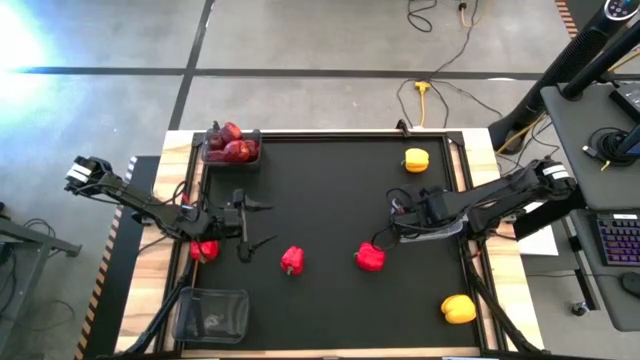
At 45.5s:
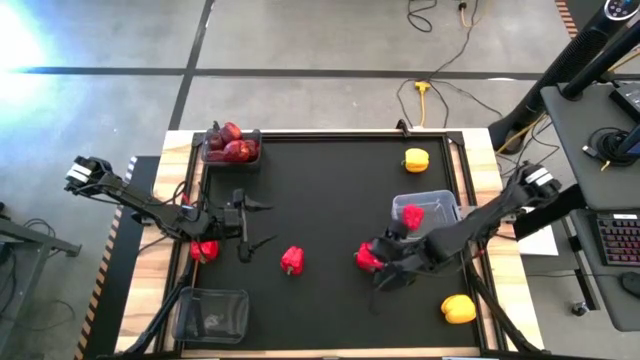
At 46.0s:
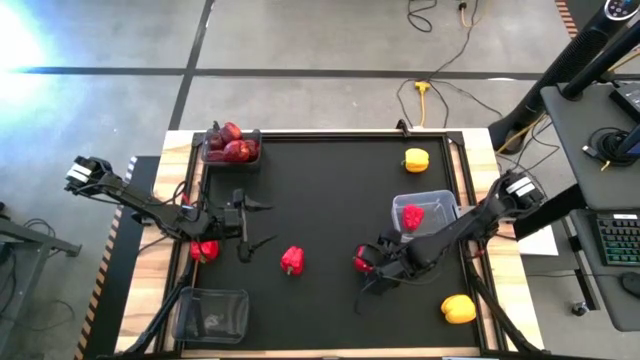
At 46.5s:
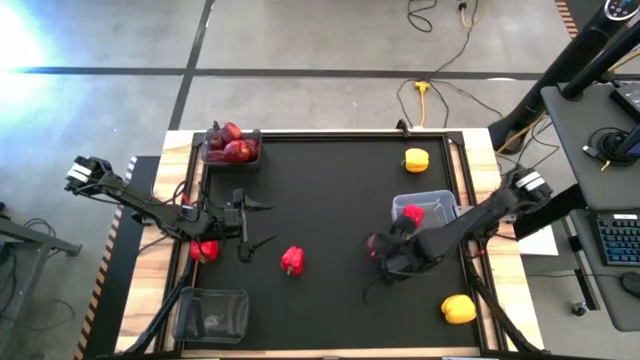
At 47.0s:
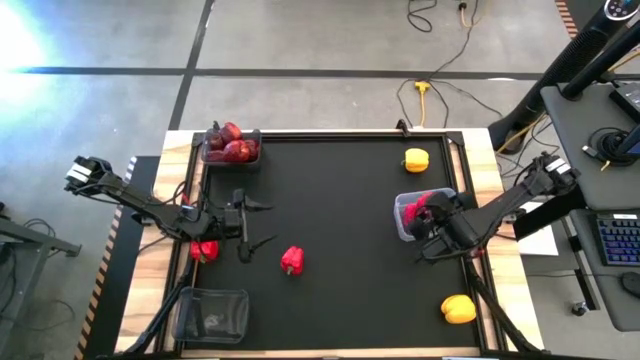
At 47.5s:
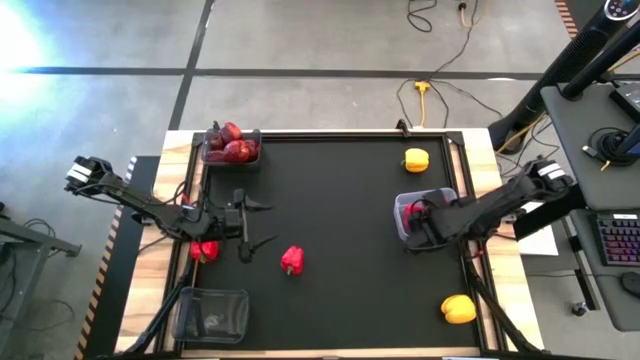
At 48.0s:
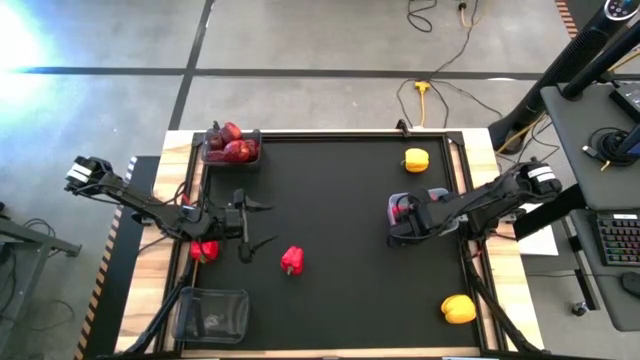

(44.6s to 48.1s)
Task: Sort produce into baskets
Put the red bell pepper into the transparent bin

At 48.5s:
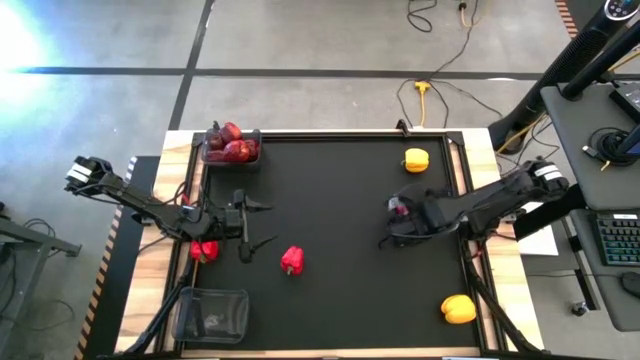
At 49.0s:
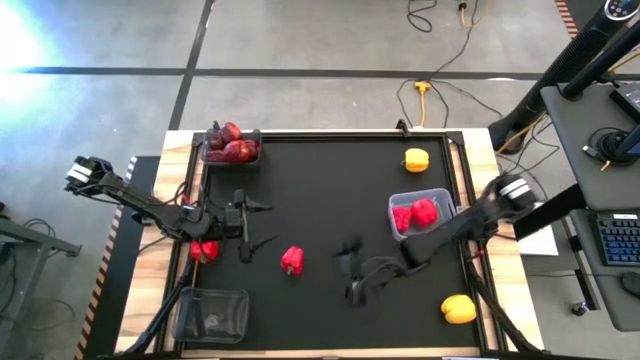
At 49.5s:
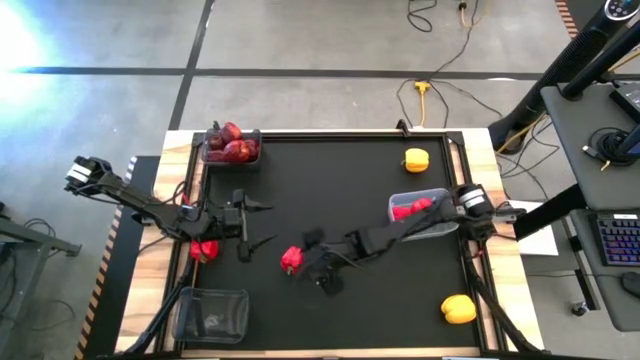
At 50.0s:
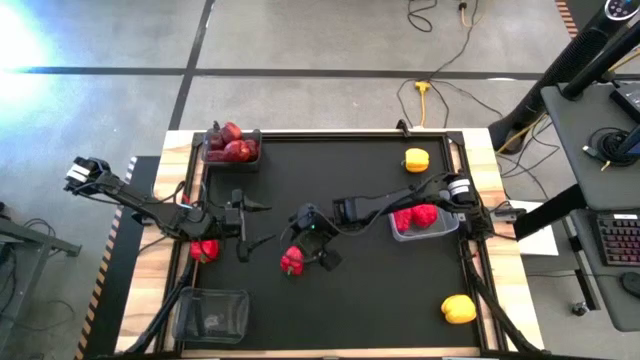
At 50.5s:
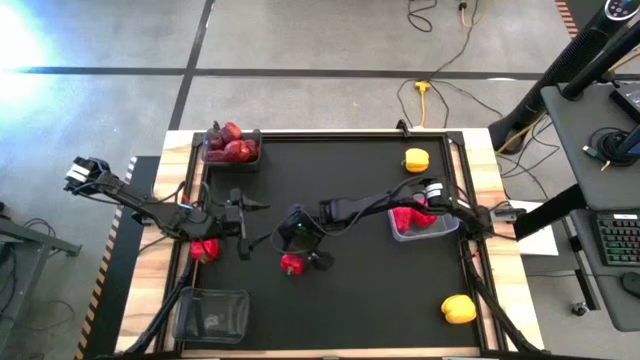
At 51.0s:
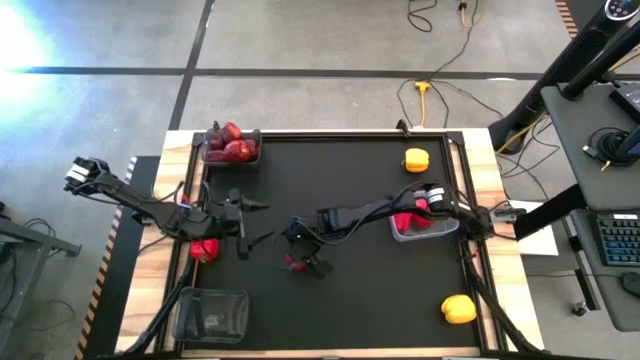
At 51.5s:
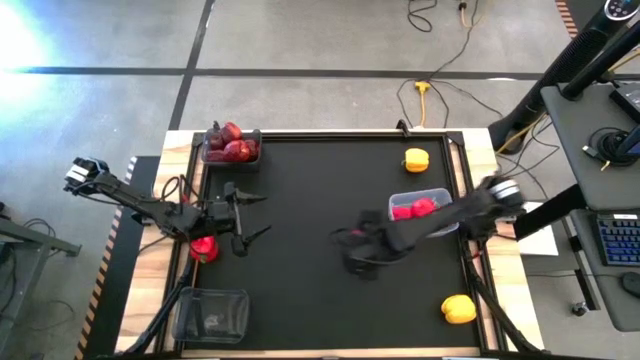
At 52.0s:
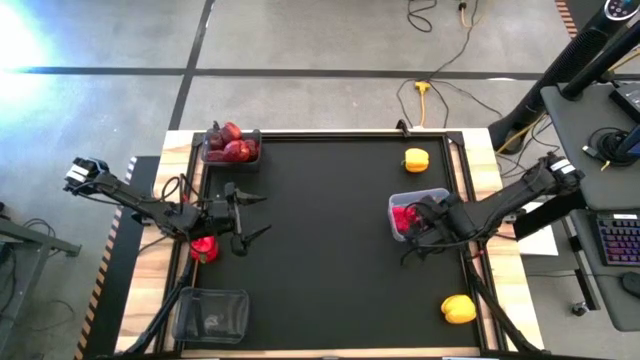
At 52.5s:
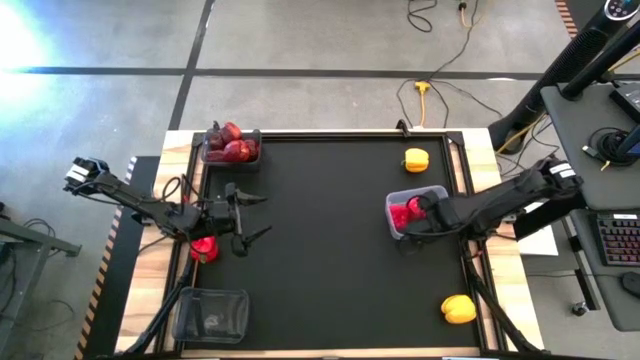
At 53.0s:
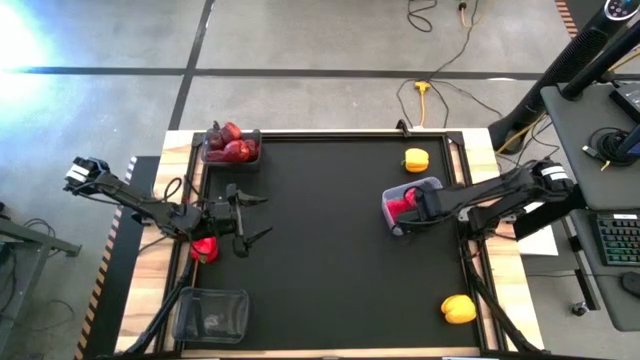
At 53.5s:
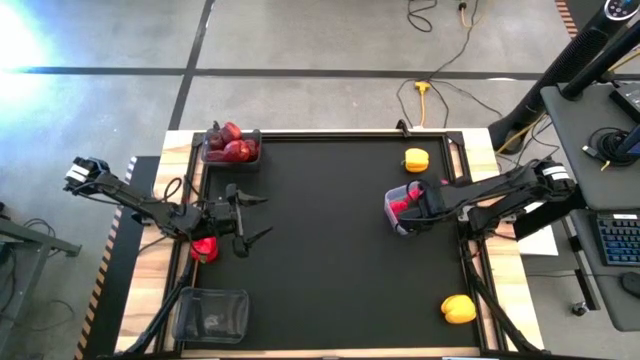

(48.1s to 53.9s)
Put the red bell pepper into the transparent bin

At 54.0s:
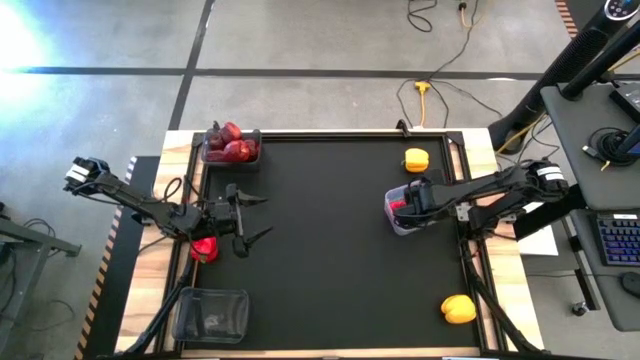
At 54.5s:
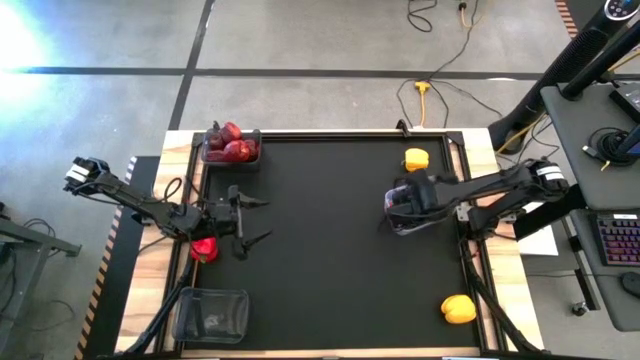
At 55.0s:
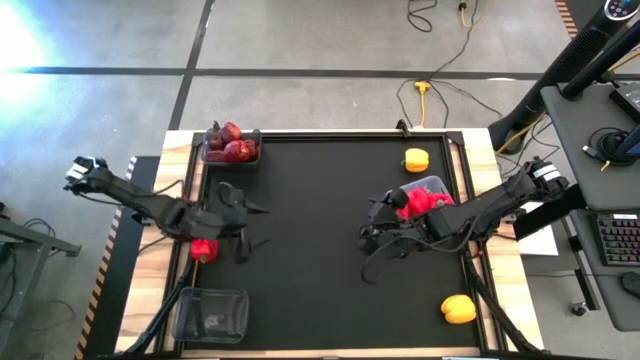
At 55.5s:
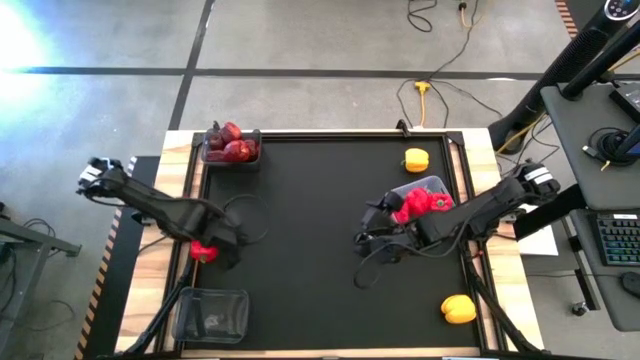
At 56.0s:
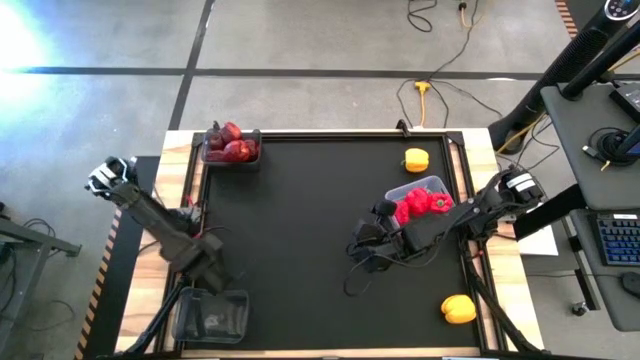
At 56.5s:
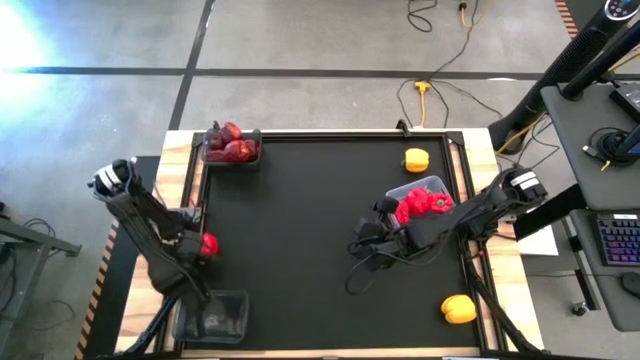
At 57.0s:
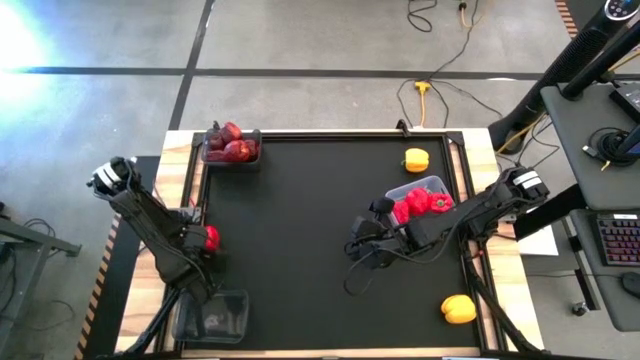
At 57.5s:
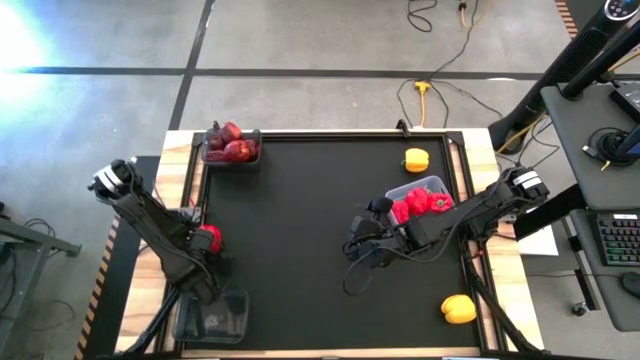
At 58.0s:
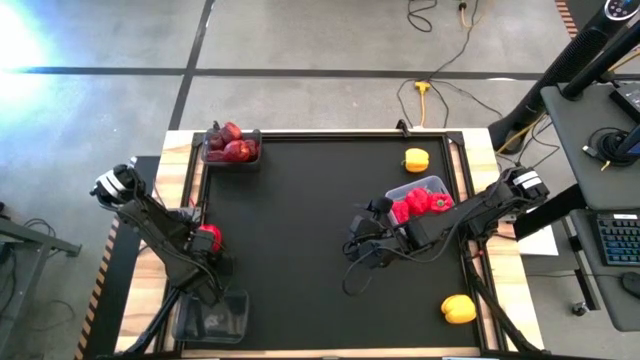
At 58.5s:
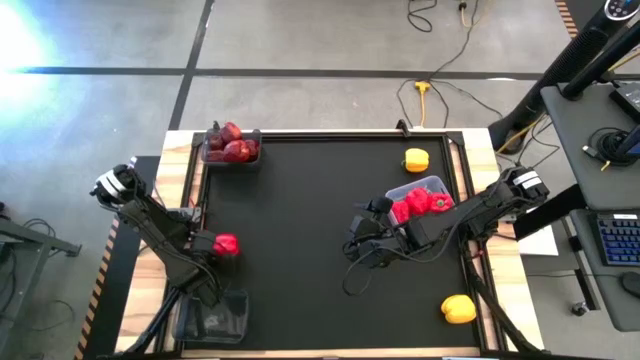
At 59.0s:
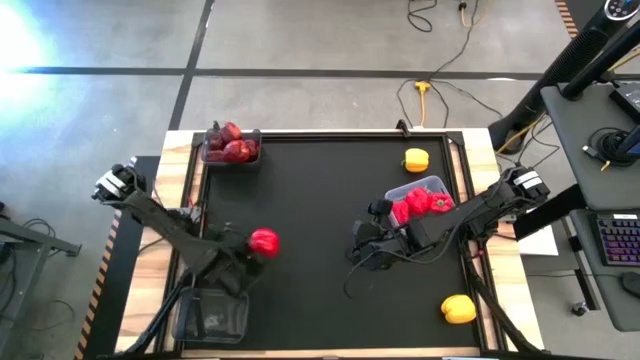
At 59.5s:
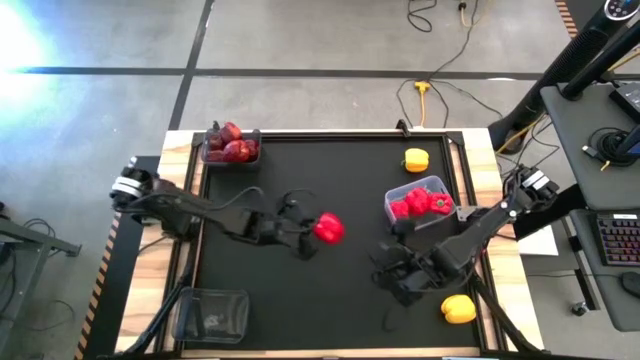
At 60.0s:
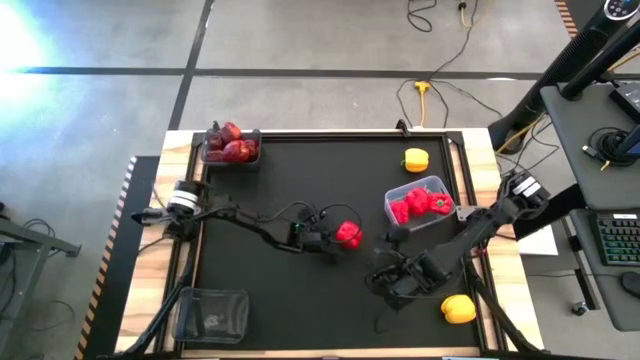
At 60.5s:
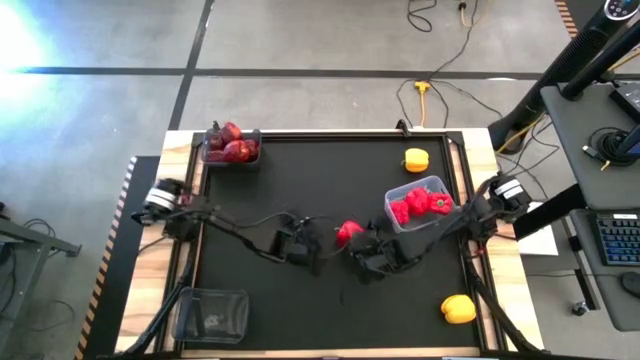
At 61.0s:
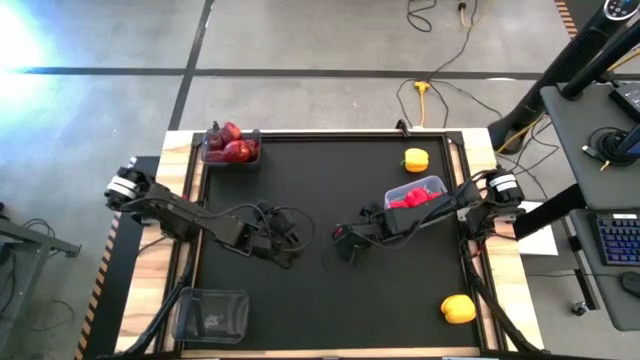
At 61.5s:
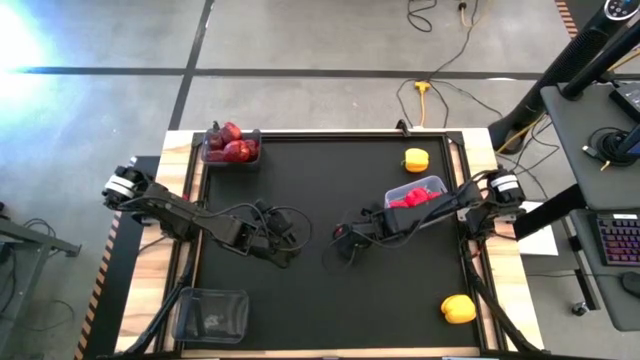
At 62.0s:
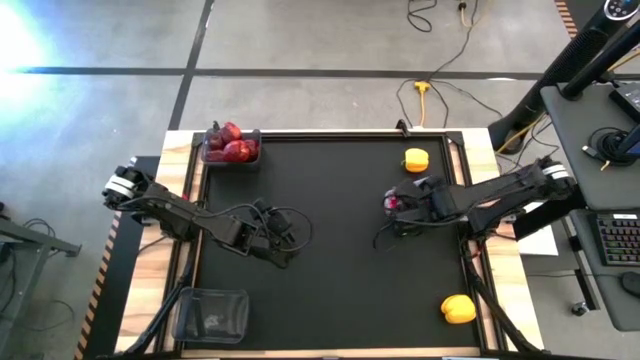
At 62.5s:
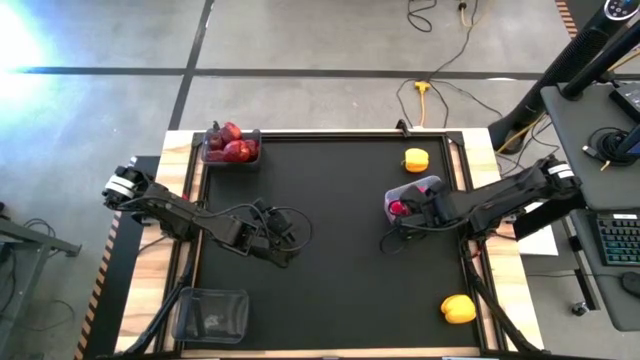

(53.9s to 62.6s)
Put the red bell pepper into the transparent bin

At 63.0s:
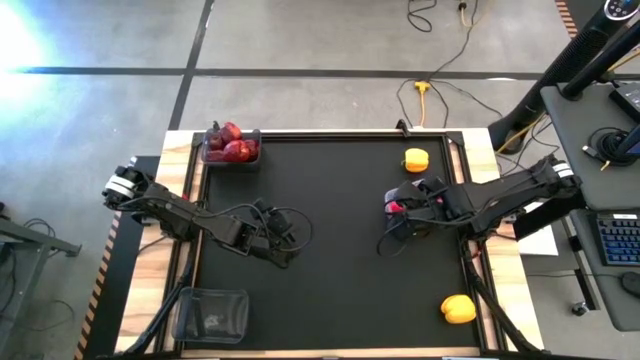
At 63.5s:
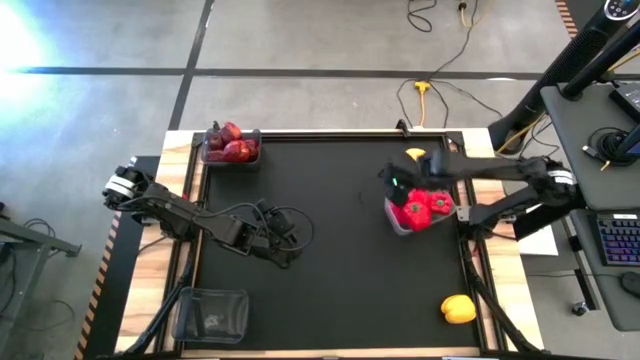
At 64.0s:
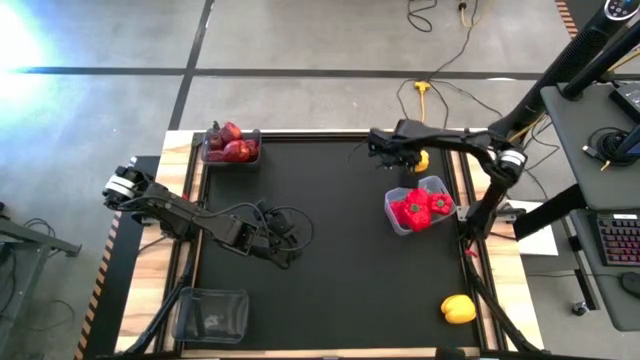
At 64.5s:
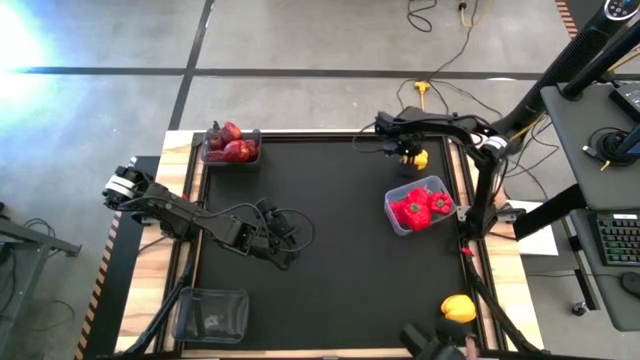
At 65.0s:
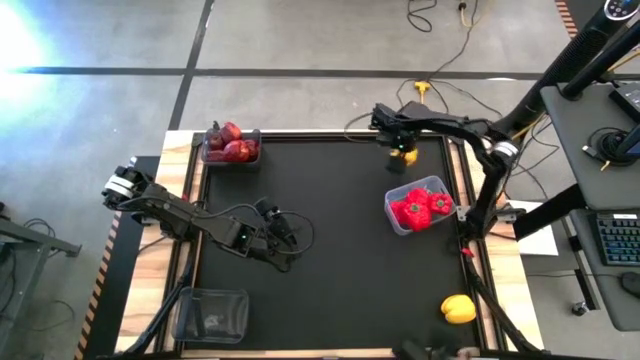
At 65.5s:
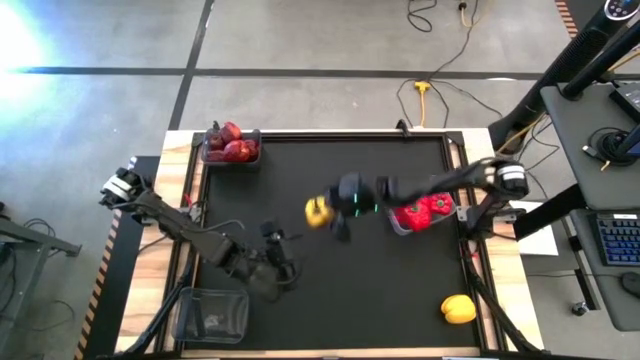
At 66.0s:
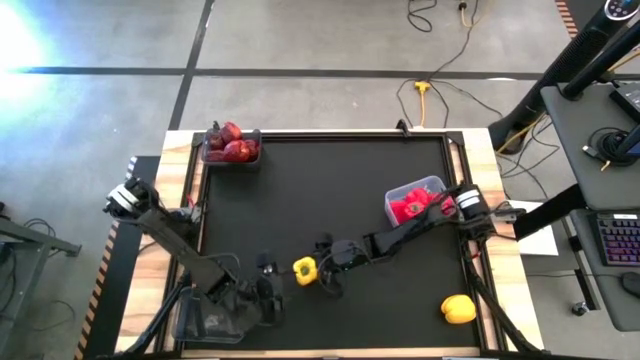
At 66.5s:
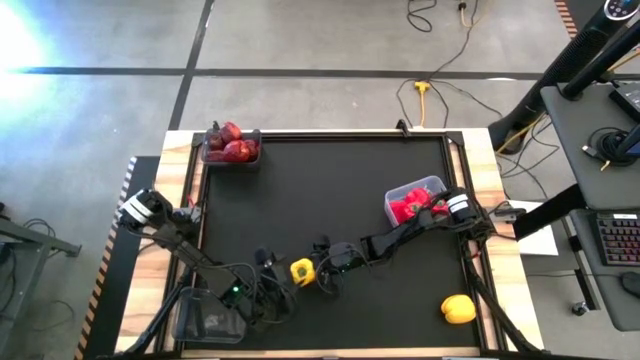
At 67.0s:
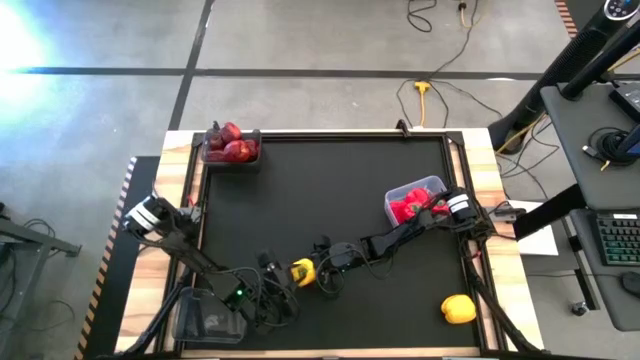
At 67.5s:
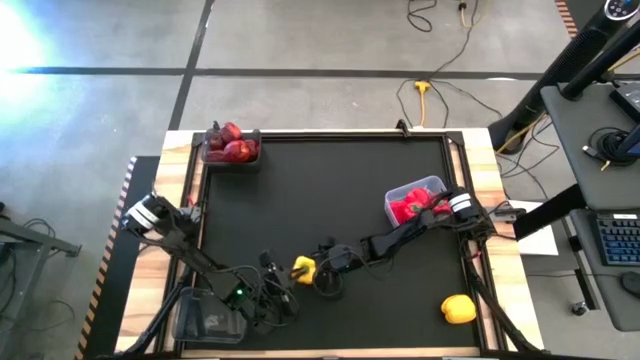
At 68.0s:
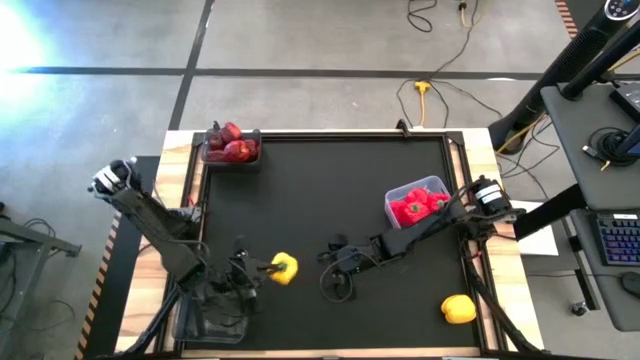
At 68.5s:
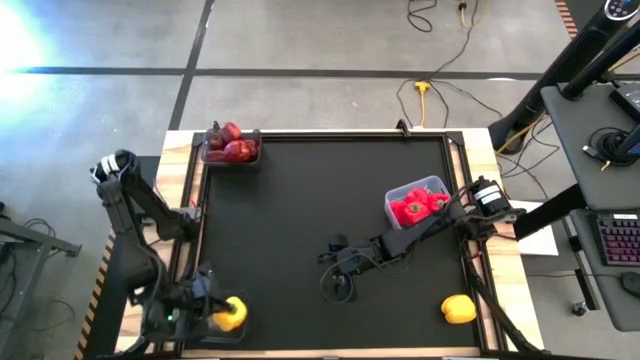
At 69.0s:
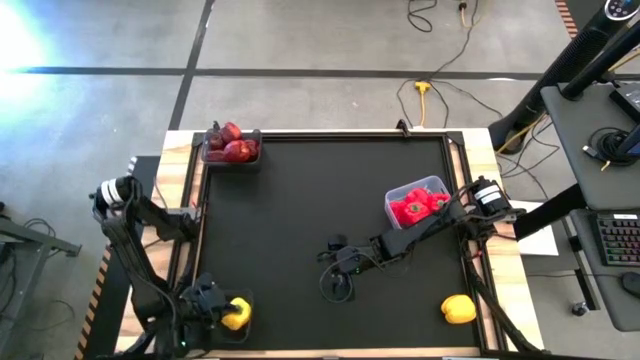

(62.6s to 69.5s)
Put the yellow bell pepper into the bottom black bin
